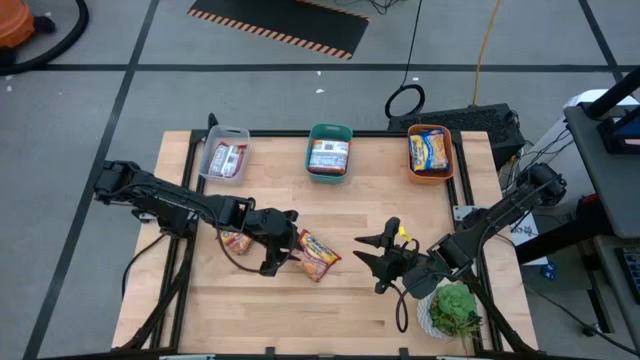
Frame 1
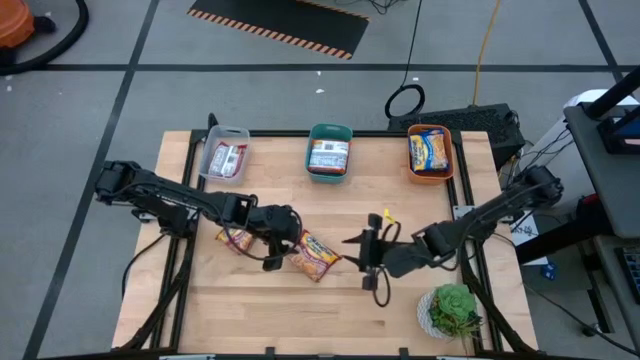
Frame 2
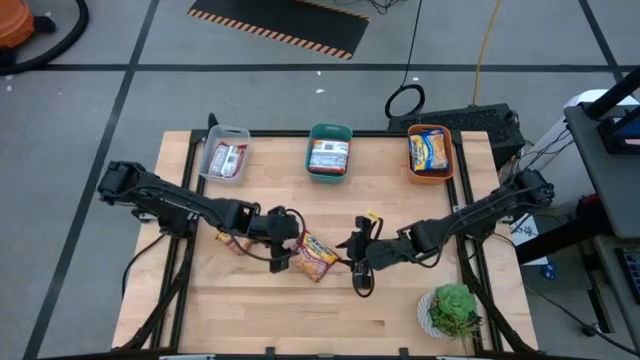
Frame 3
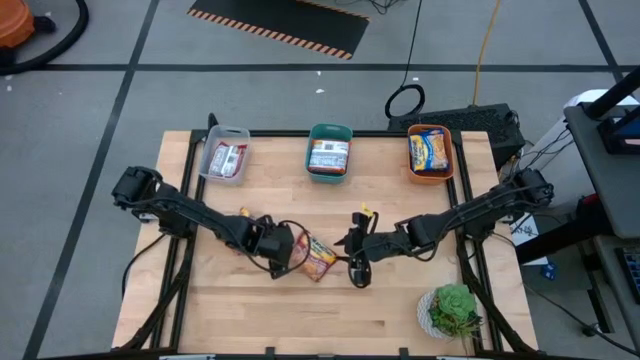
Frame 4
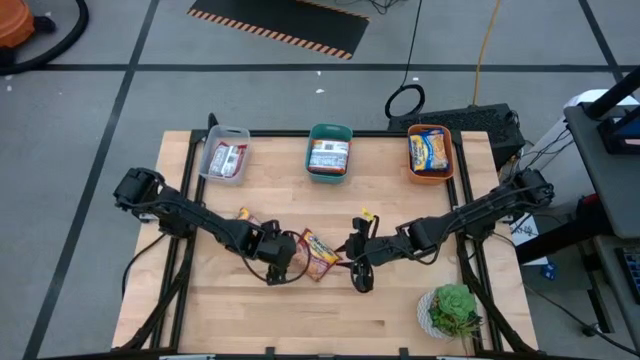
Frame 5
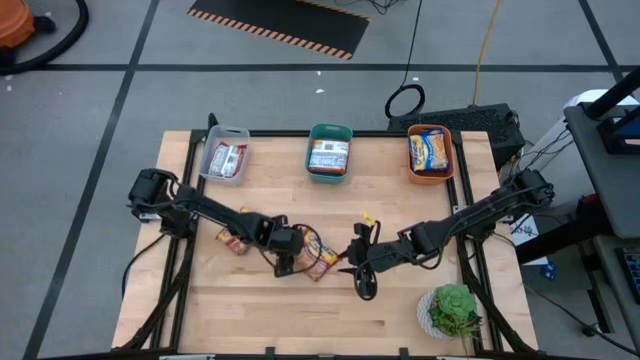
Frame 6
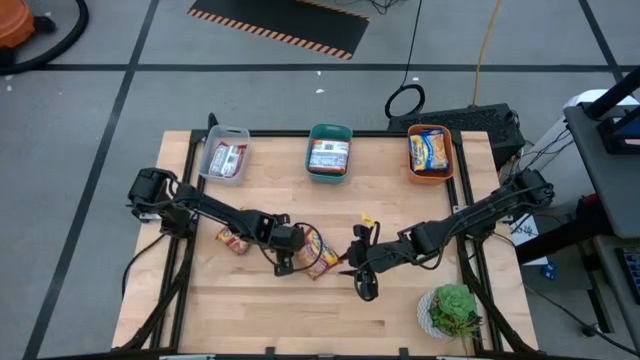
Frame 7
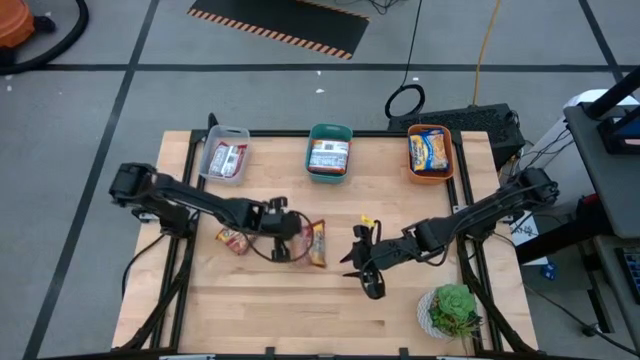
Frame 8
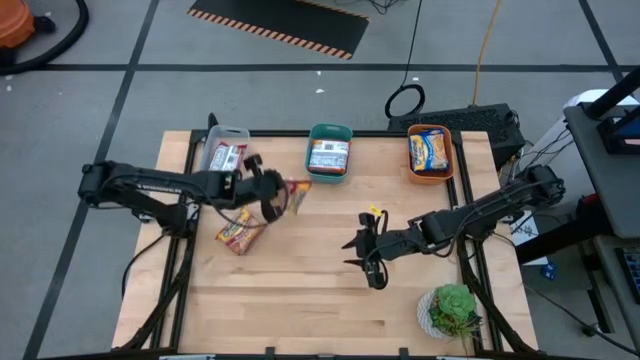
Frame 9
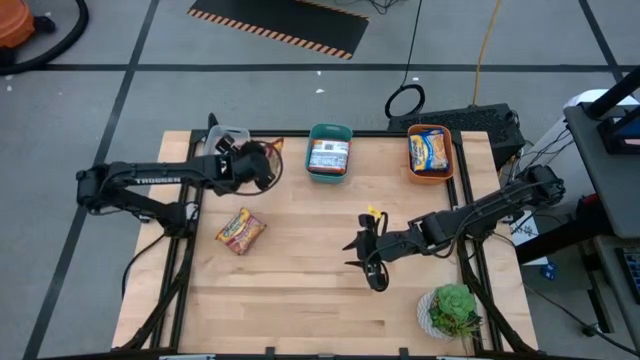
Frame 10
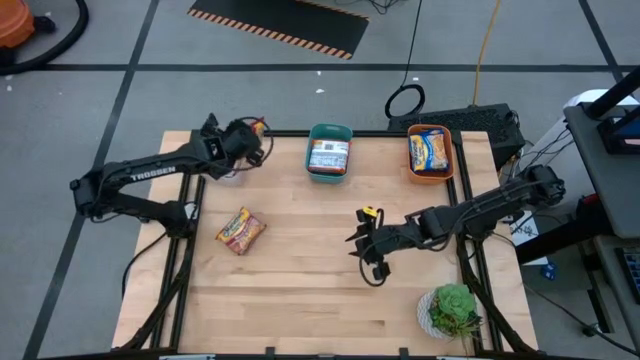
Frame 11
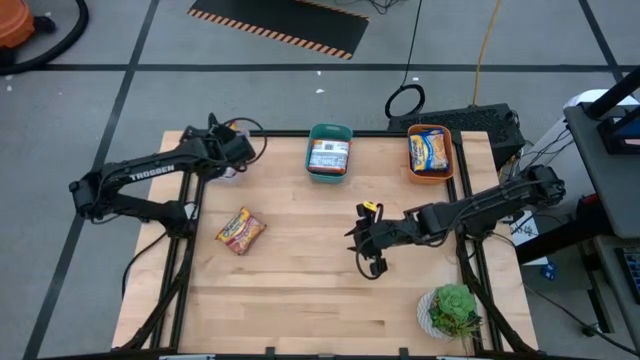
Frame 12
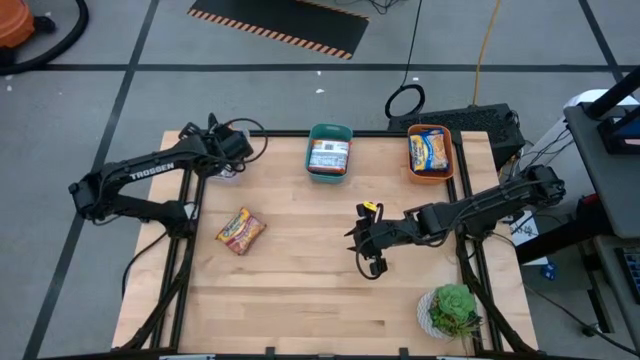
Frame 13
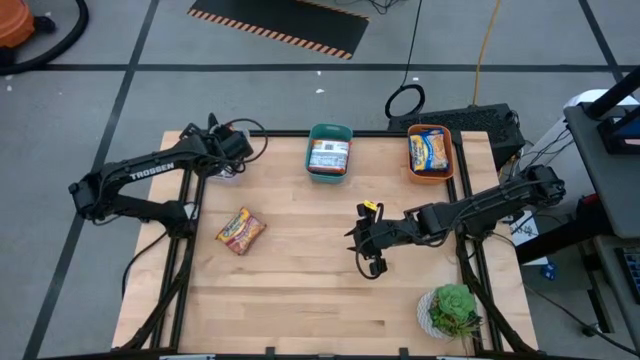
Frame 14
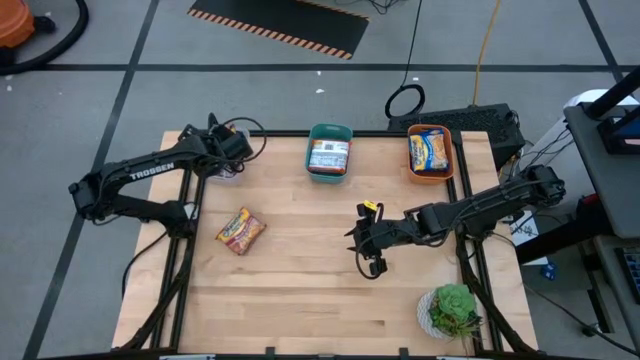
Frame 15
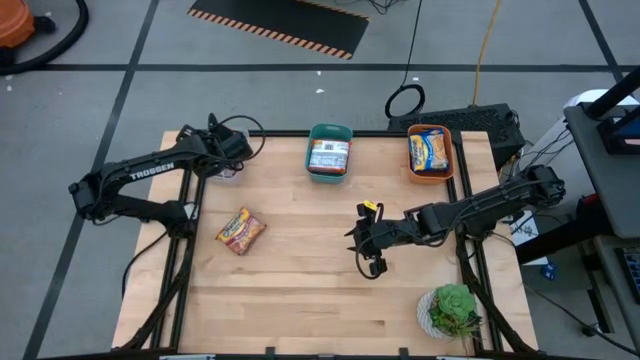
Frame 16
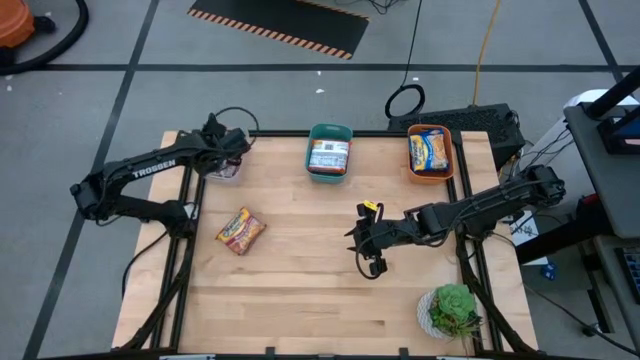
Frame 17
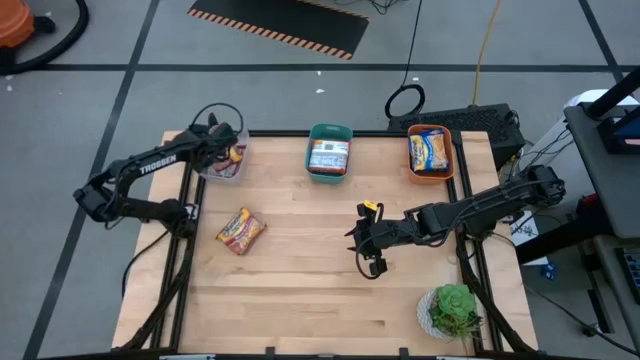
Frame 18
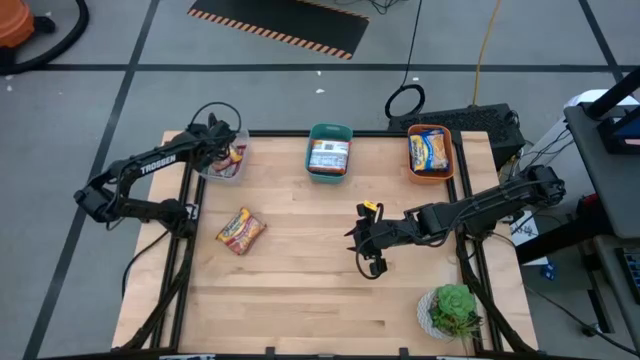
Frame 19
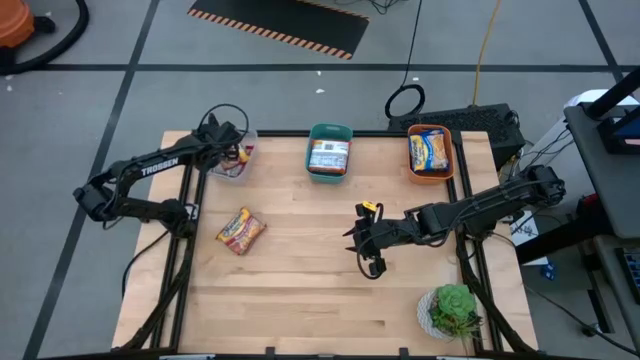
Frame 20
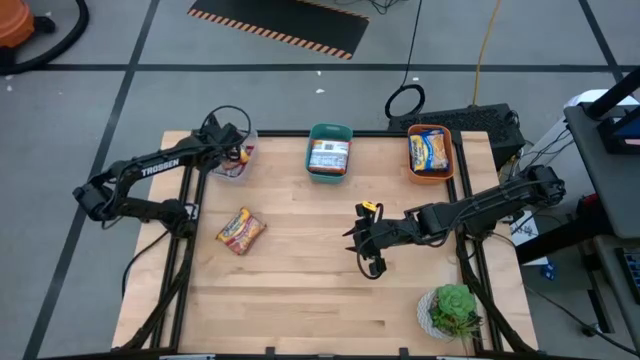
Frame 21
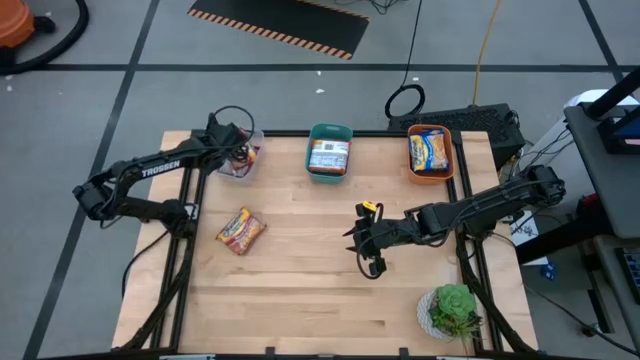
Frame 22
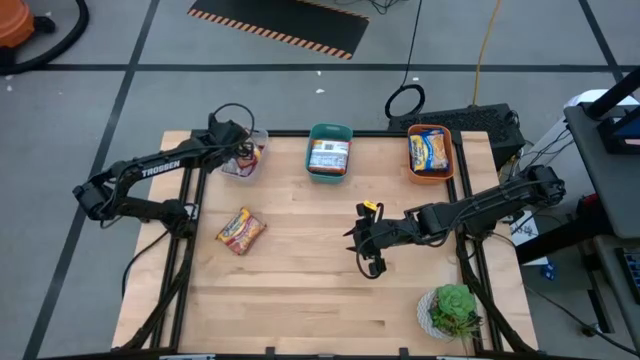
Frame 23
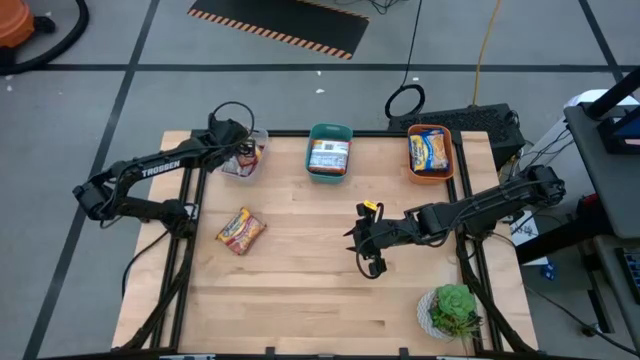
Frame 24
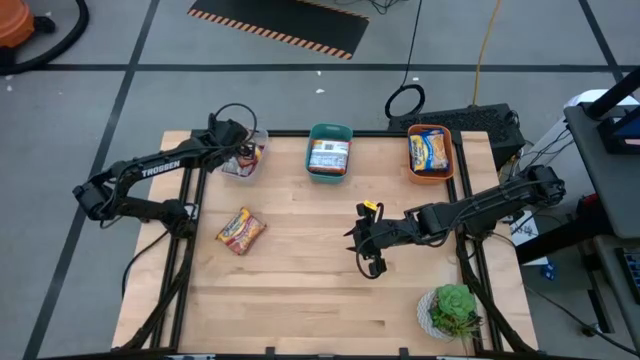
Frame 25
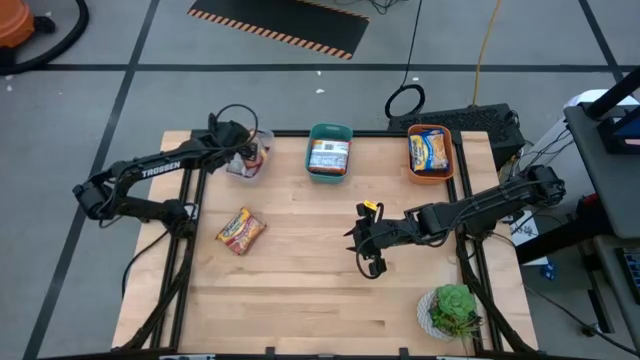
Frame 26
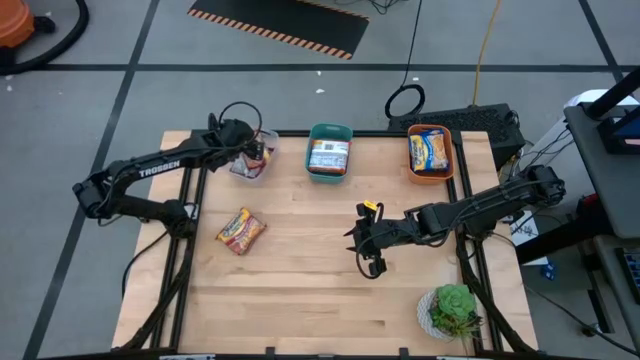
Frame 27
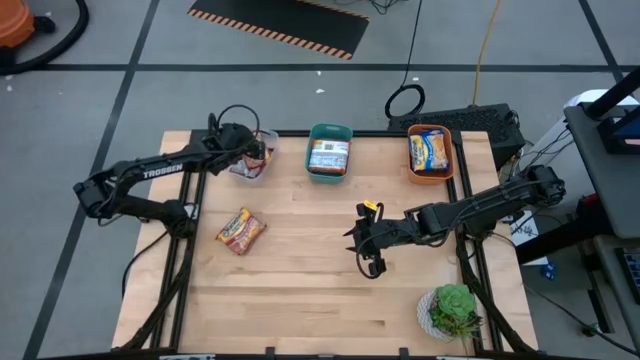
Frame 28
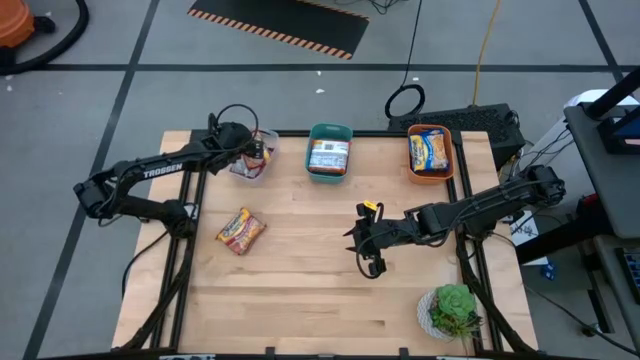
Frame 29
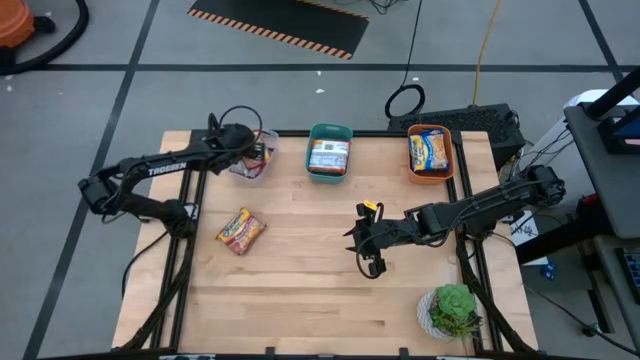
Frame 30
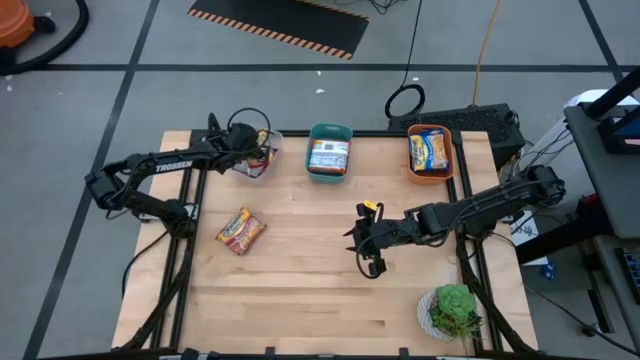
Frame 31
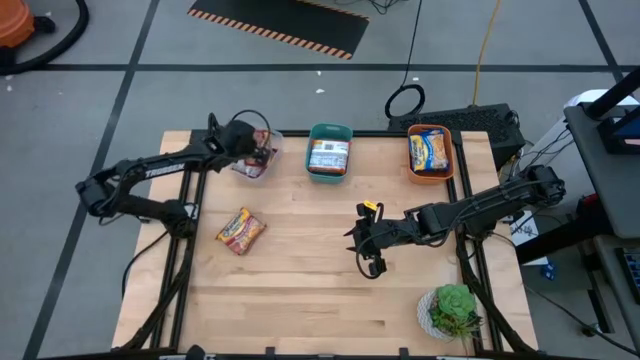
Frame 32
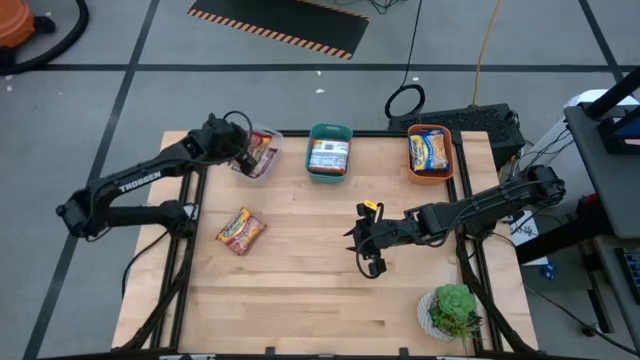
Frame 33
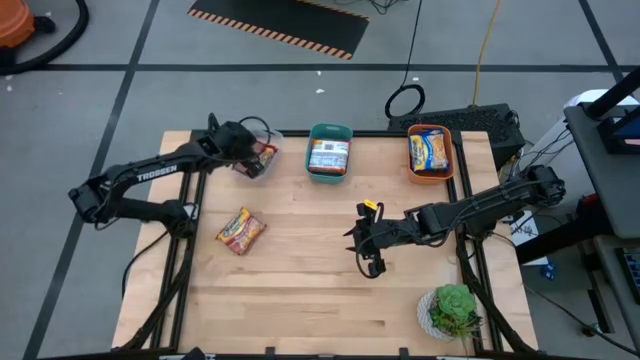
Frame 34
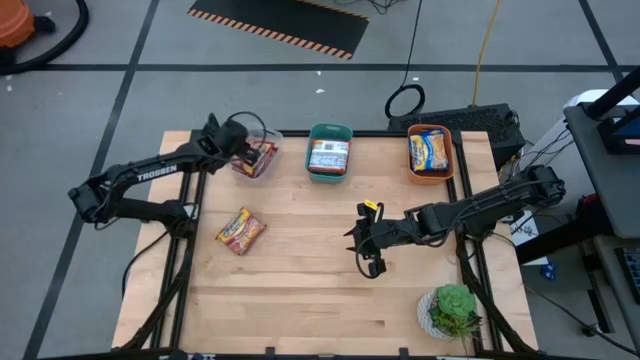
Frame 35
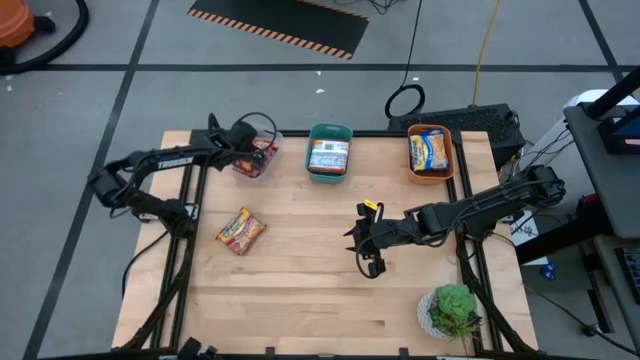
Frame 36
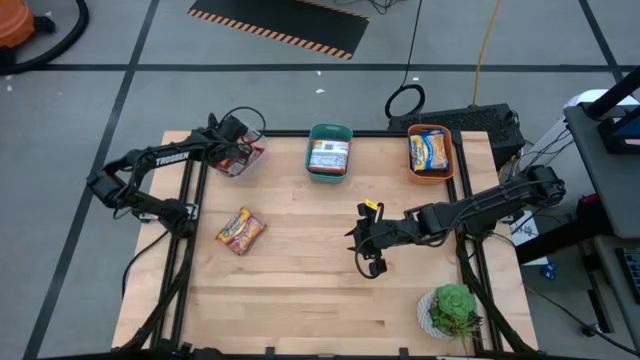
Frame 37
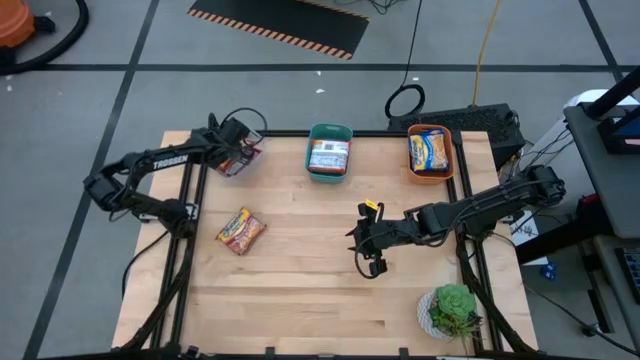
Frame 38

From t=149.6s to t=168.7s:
Task: Sort Maruchan noodles
Put the right red noodle pack into the transparent bin

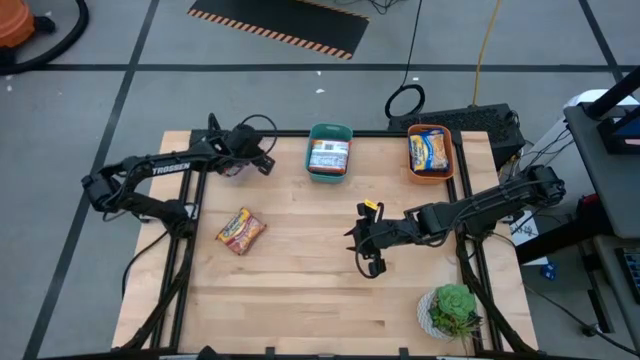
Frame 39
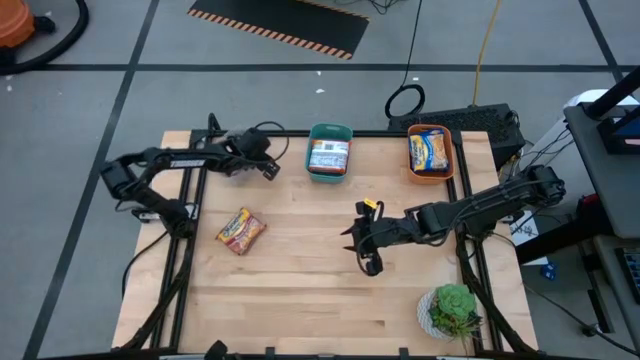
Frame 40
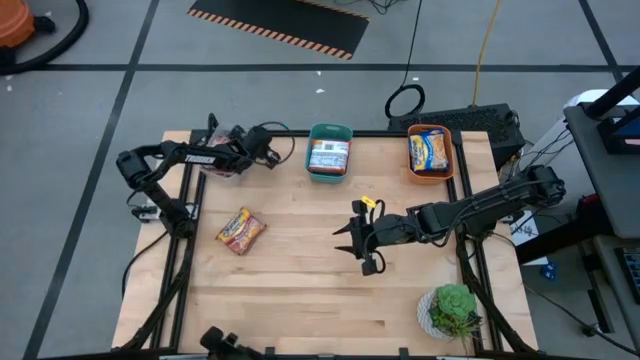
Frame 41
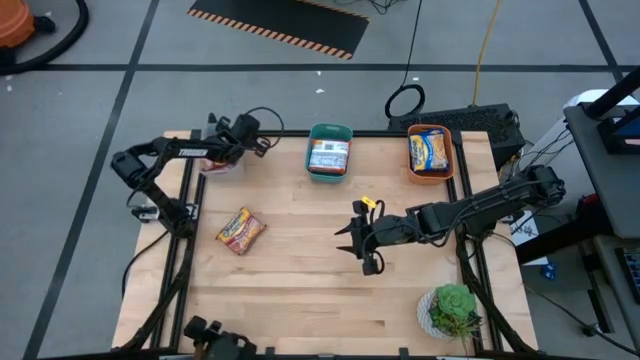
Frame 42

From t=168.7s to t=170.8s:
Adjust the transparent bin
